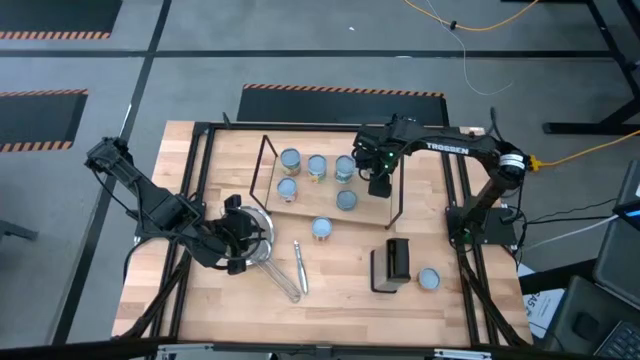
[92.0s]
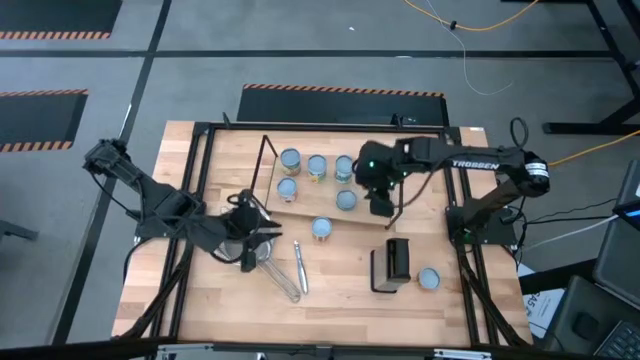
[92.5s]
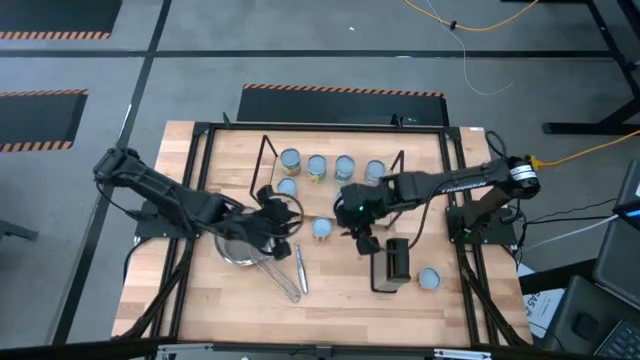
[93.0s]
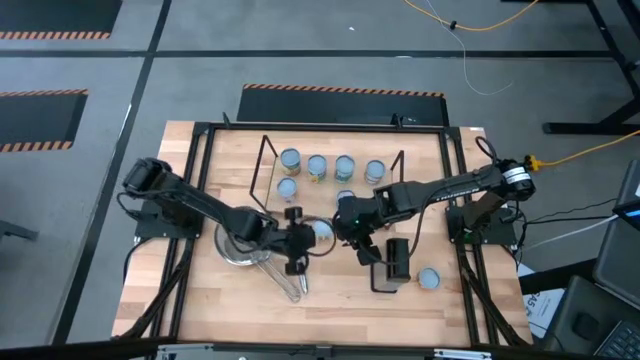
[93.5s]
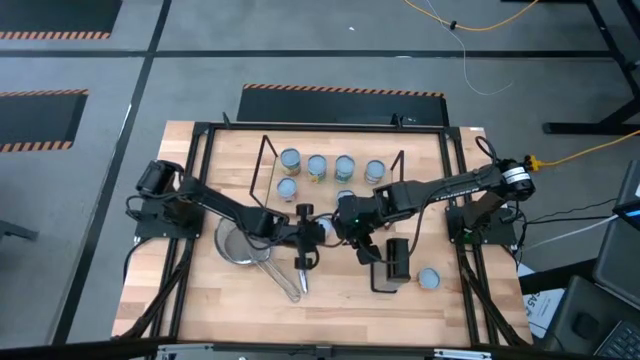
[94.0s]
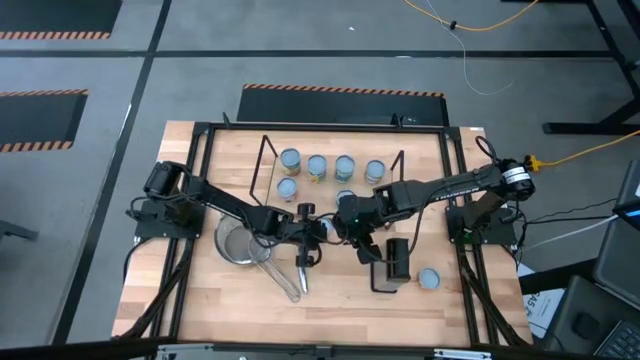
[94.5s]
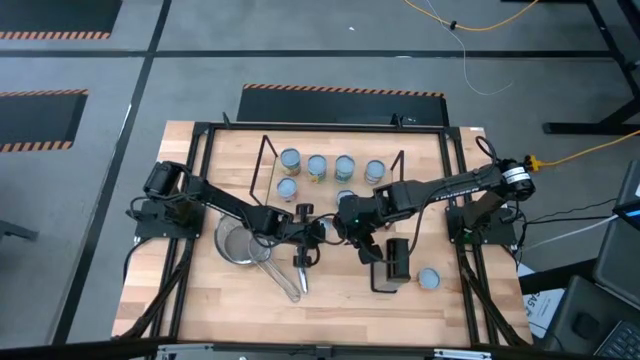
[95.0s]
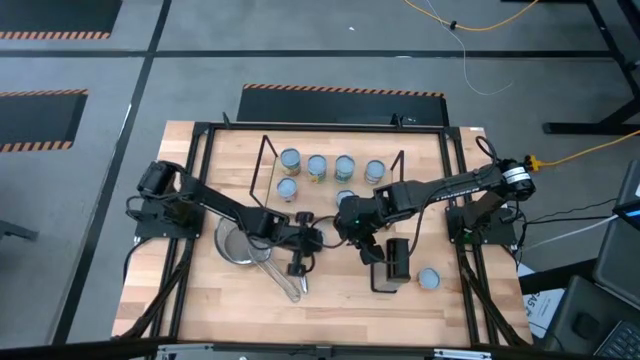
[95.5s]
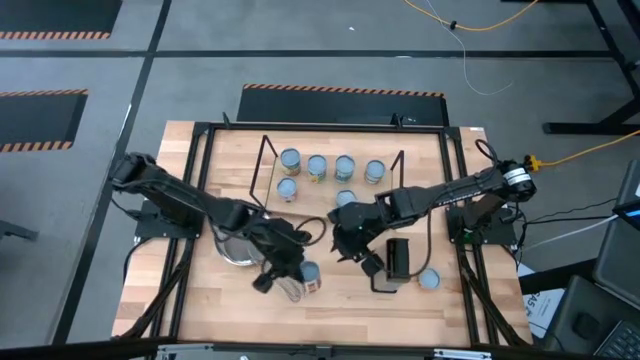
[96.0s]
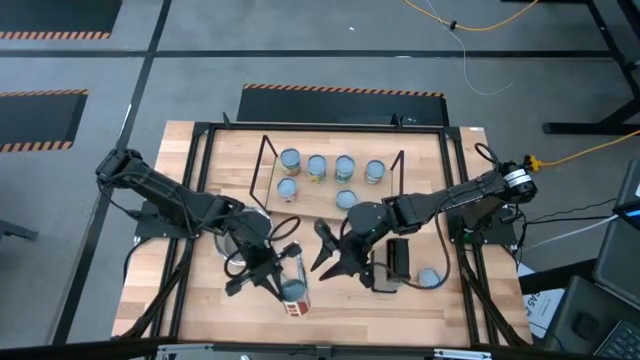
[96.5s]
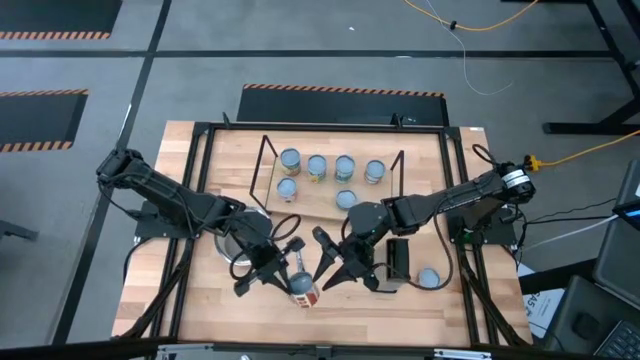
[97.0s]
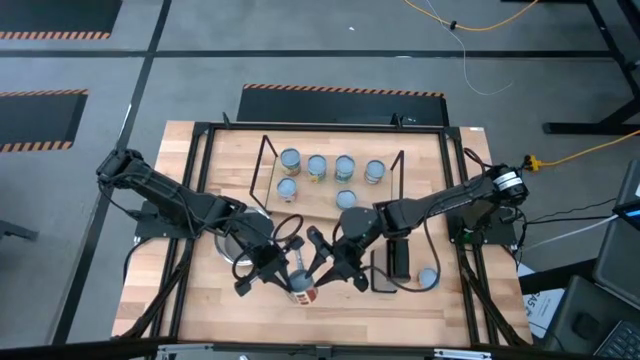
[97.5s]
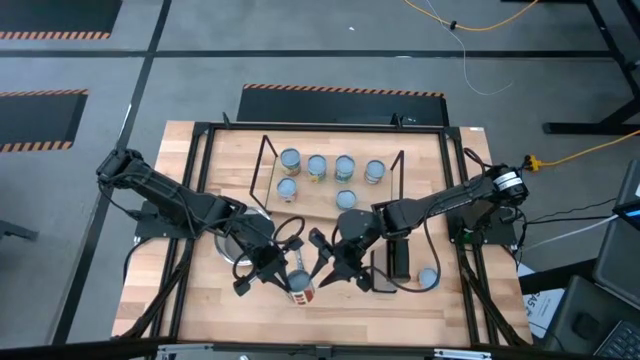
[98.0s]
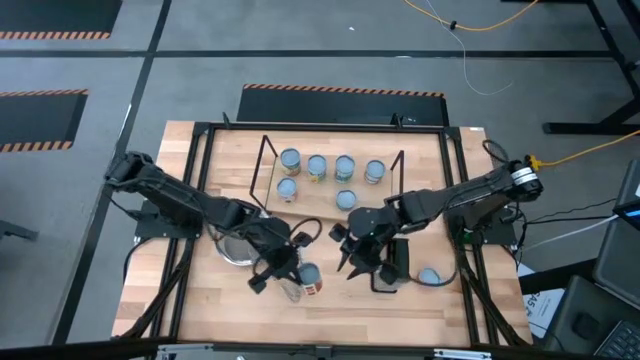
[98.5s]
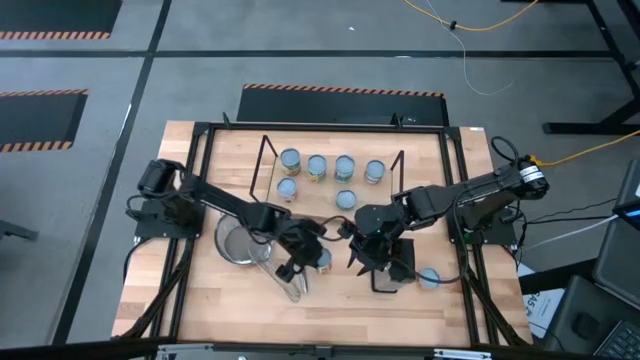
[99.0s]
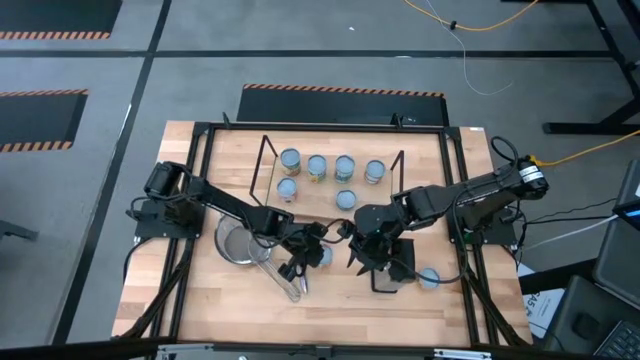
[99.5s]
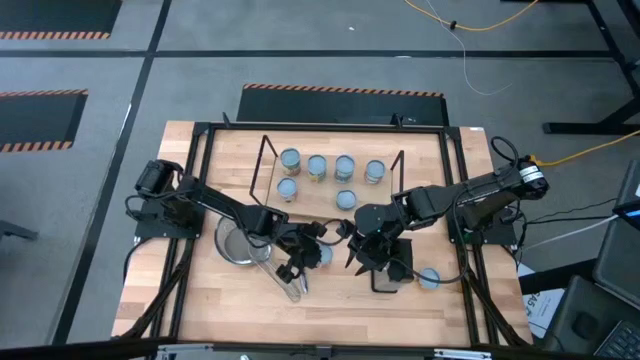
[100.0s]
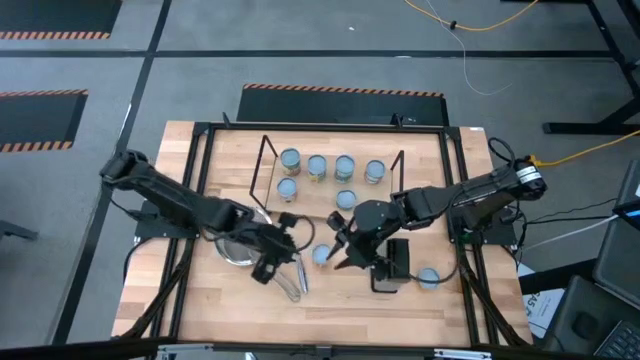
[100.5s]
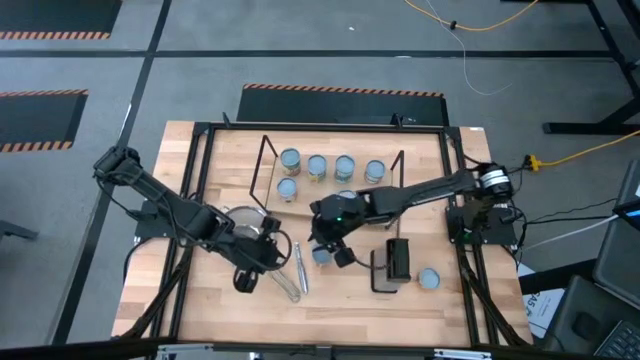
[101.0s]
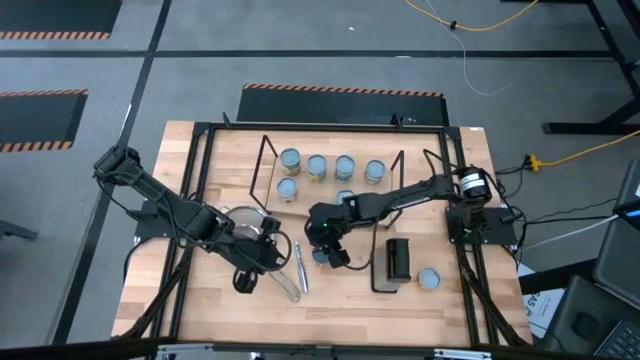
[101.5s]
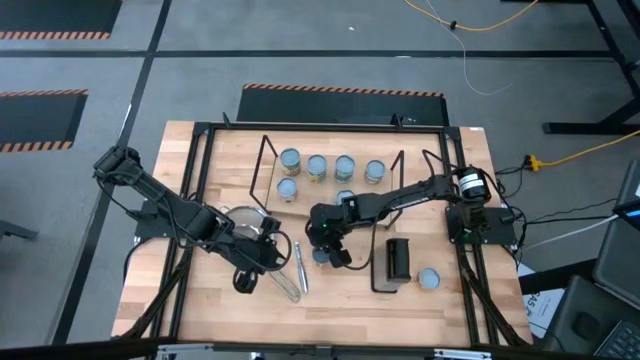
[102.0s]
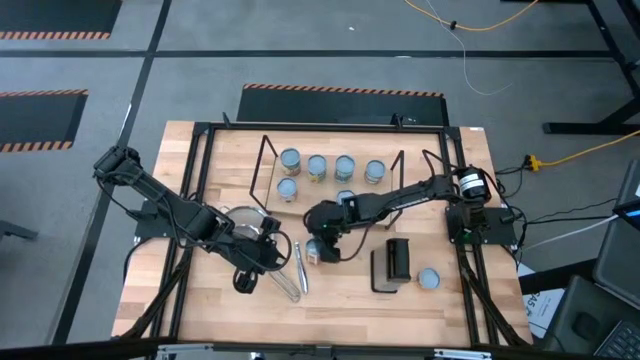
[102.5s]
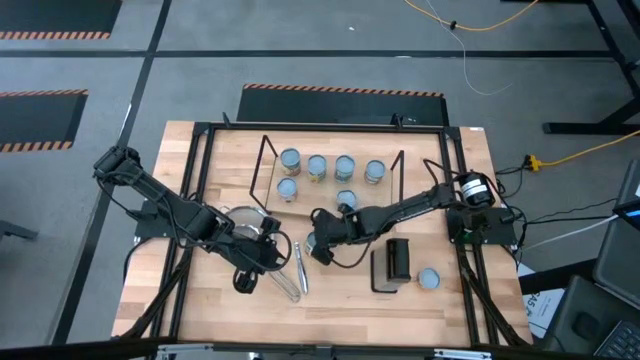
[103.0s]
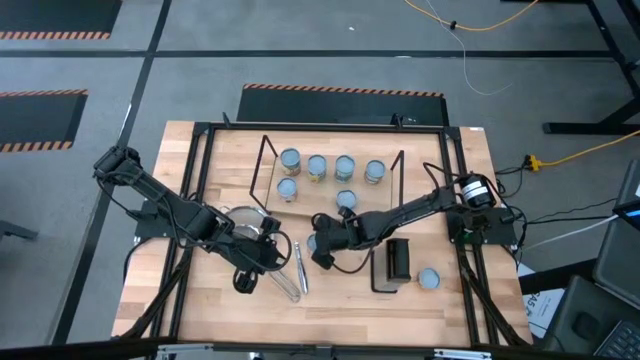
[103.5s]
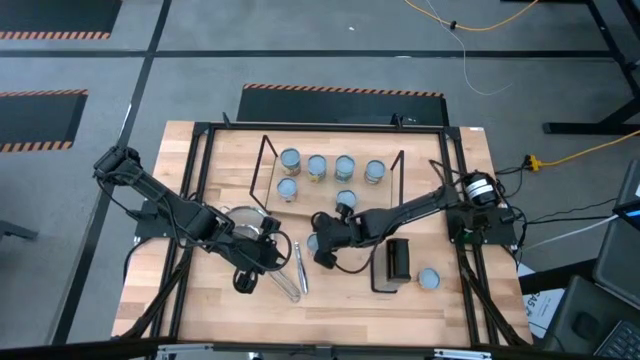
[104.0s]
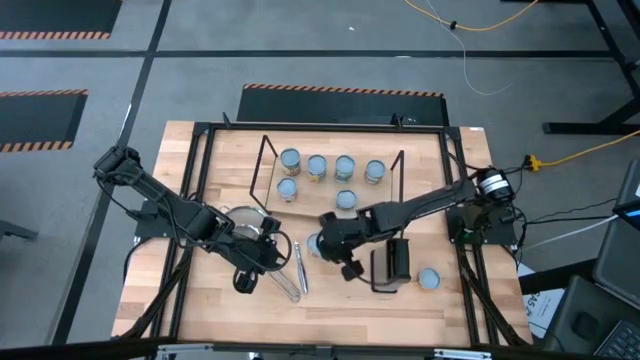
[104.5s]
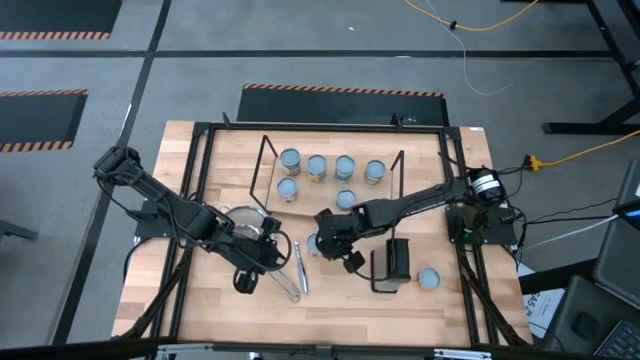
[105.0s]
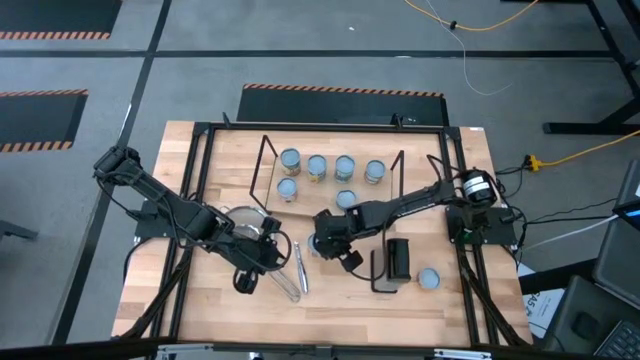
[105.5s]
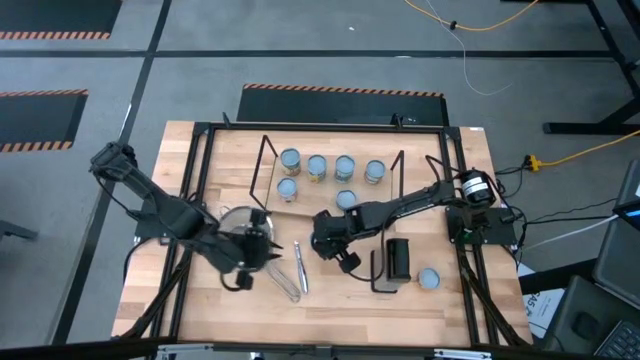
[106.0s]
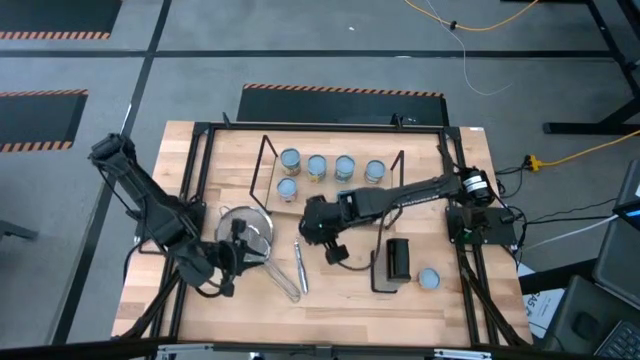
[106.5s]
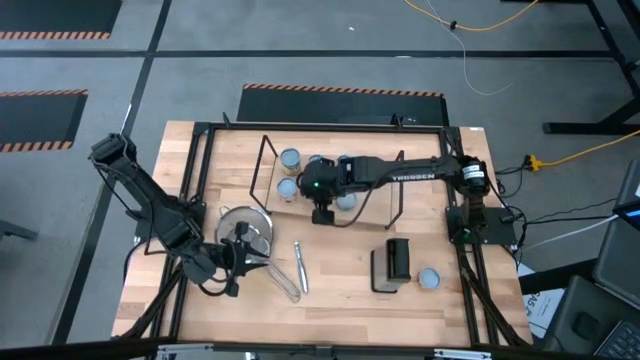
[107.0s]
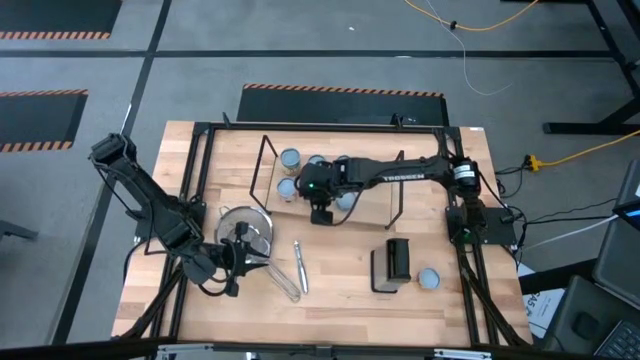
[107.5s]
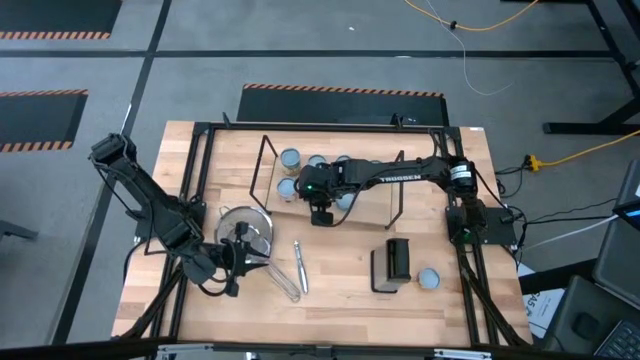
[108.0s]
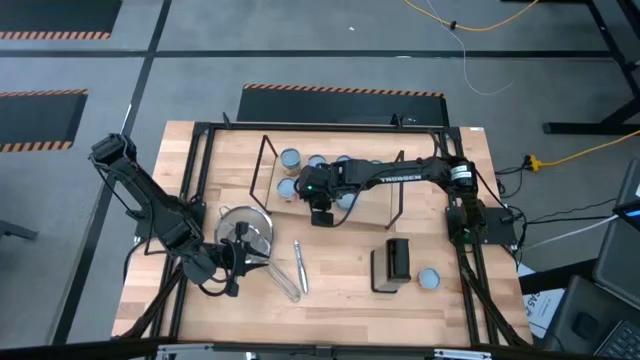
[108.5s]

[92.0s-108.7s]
Task: Pick and place cans onto a shelf
Put the brown can on the shelf aligned with the other red can

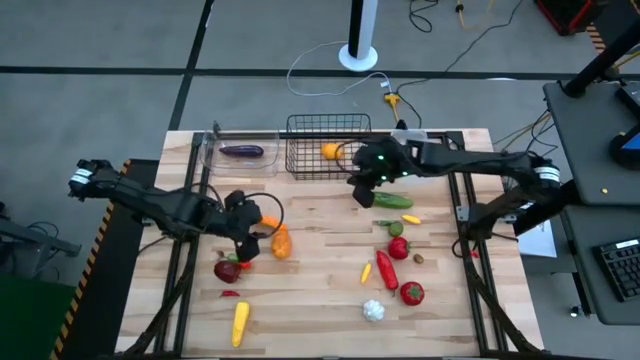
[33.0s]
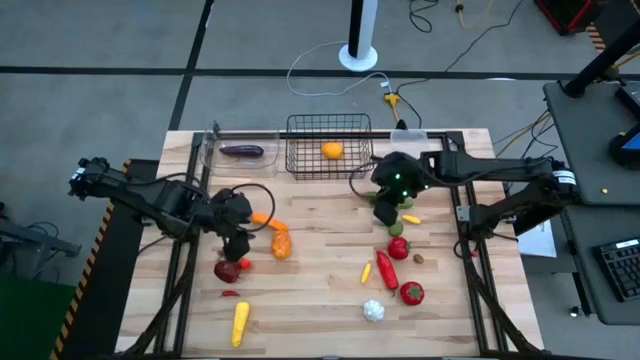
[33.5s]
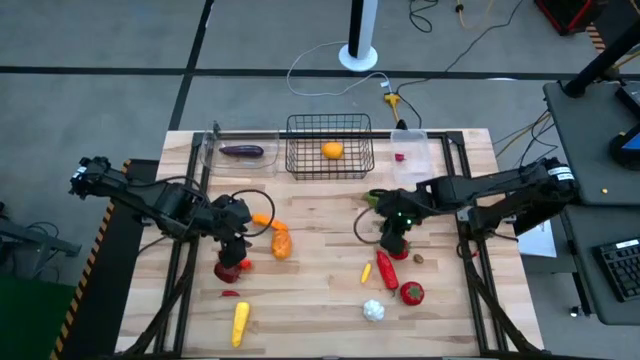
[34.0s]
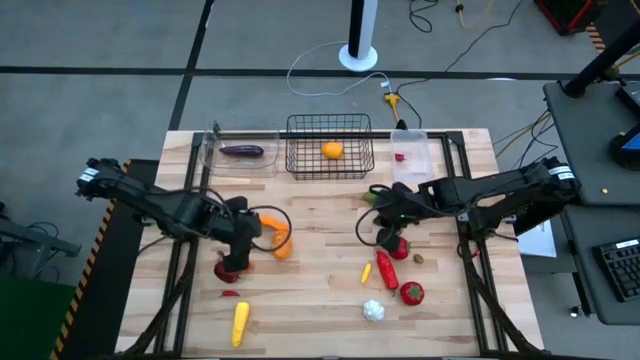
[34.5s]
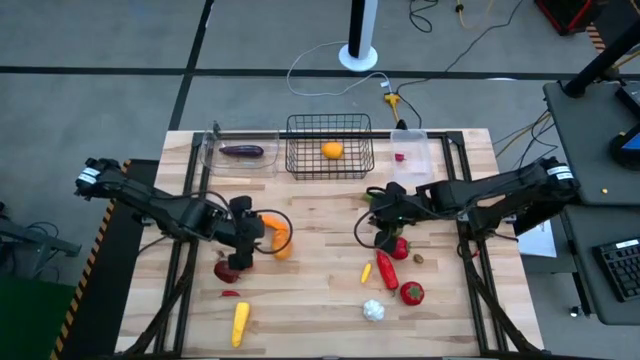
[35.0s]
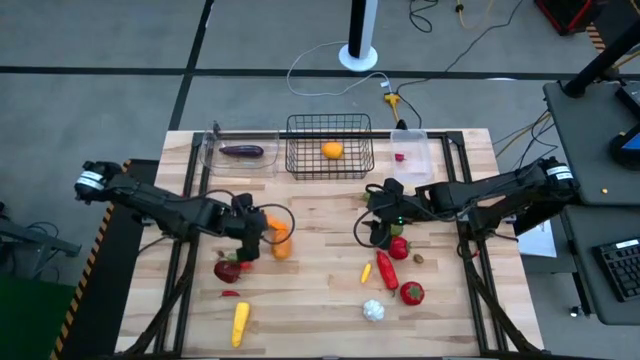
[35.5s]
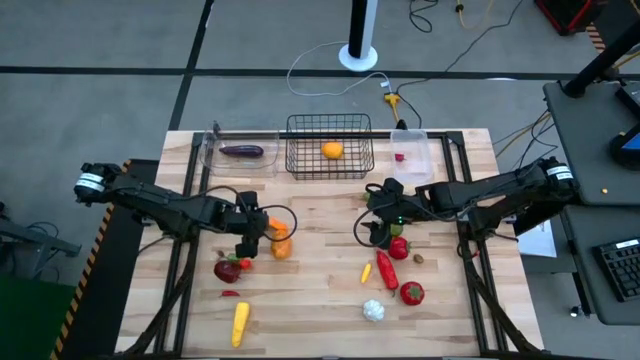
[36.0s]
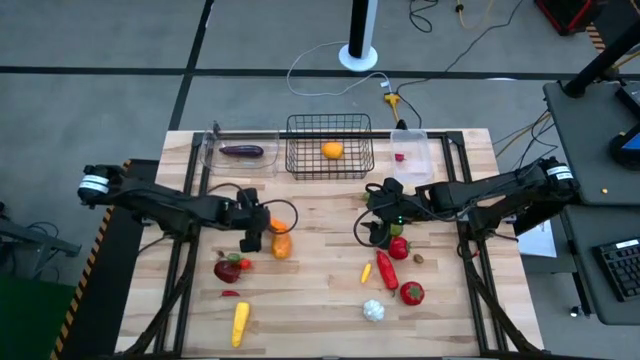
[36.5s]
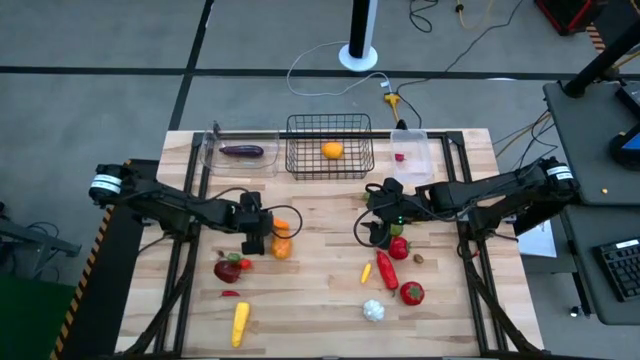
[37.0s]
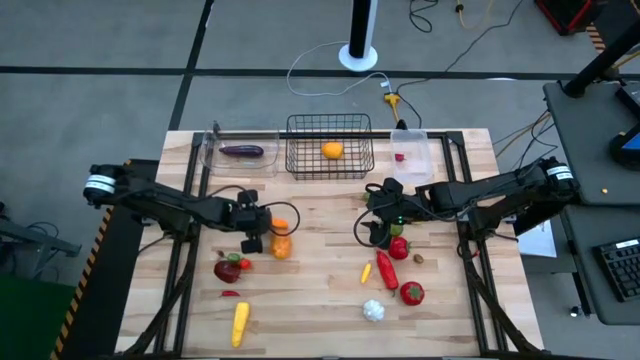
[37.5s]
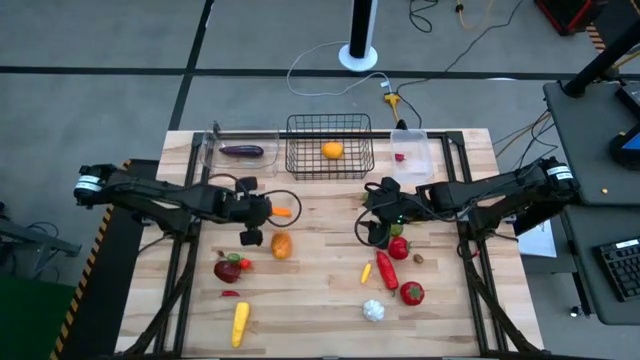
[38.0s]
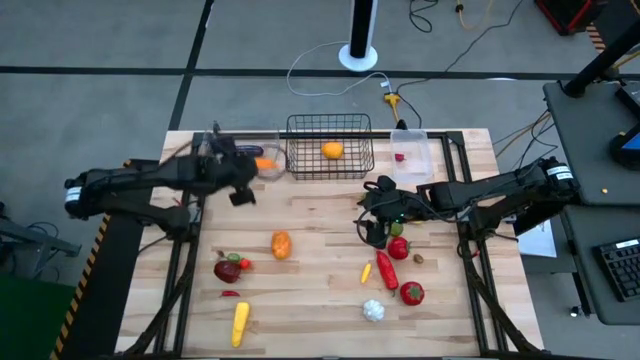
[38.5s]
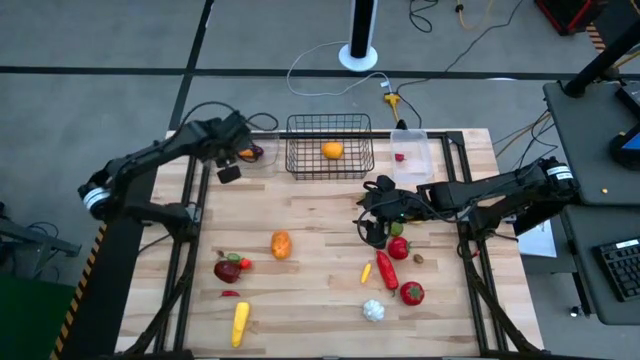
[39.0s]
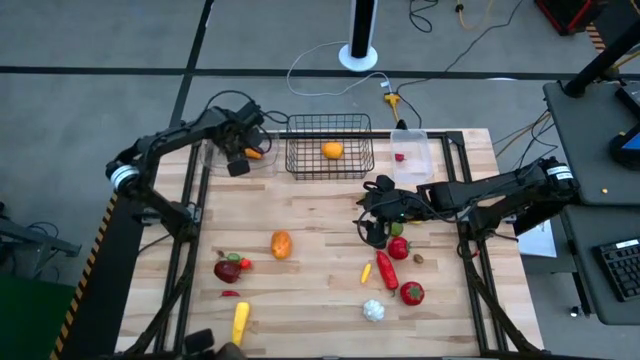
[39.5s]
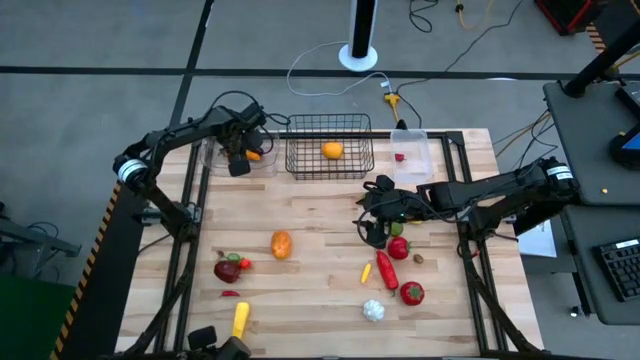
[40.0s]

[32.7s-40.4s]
Task: Sort produce into baskets
Put the orange chili pepper into the clear bin
